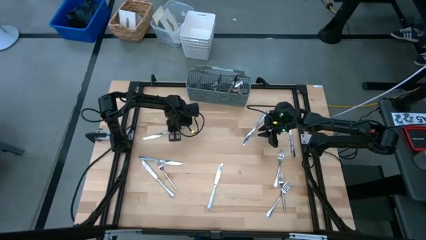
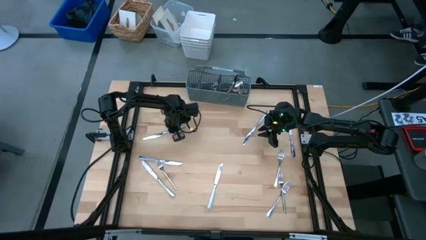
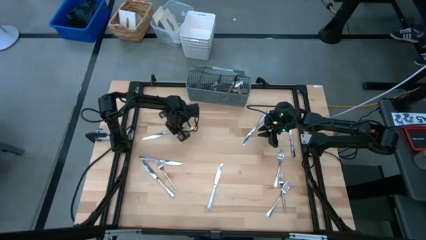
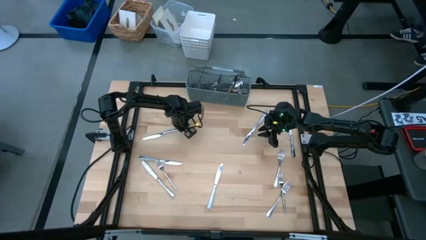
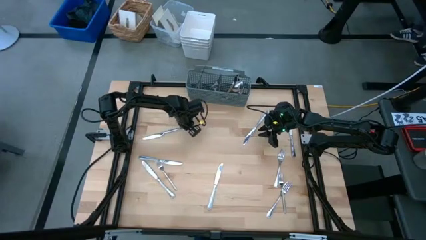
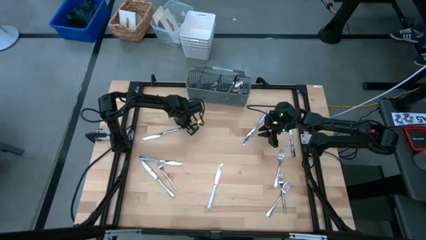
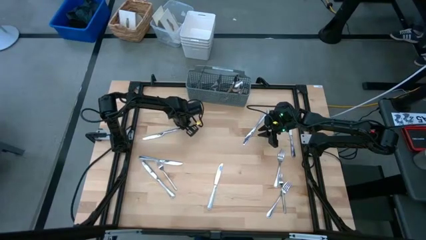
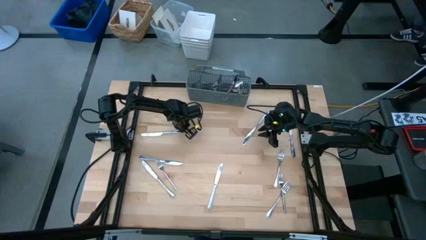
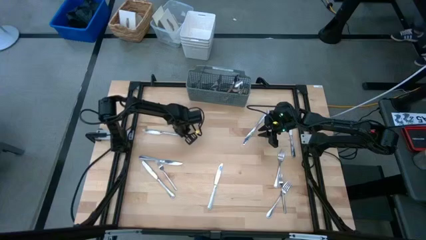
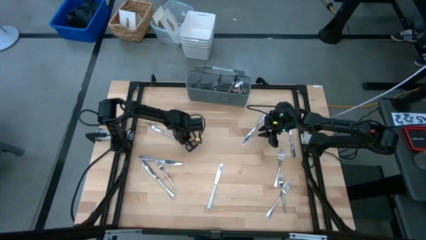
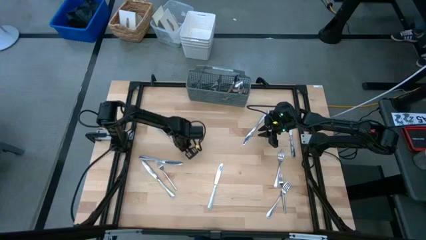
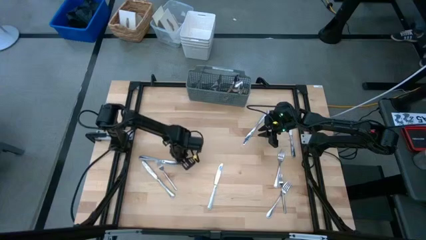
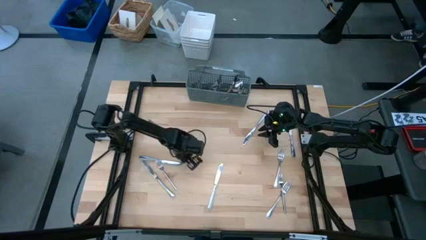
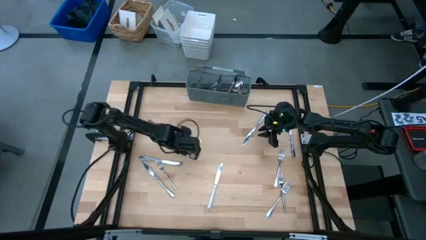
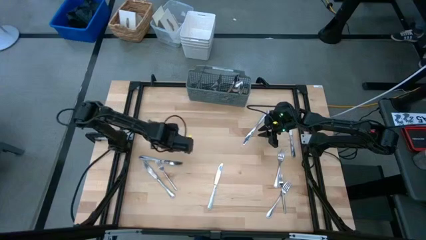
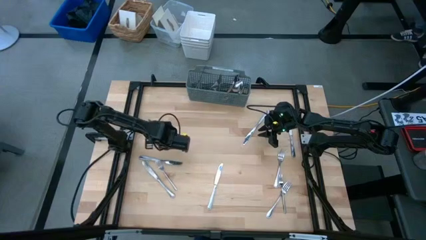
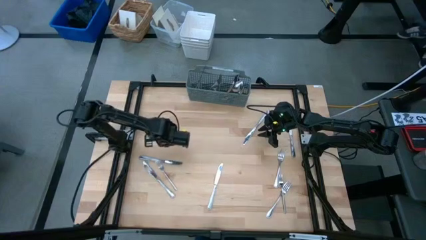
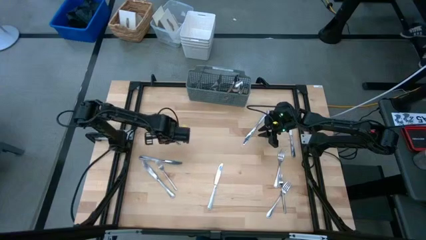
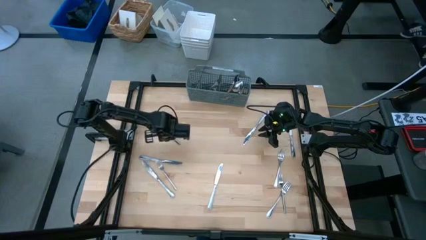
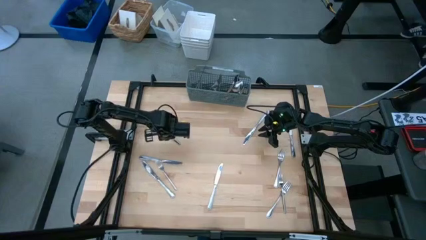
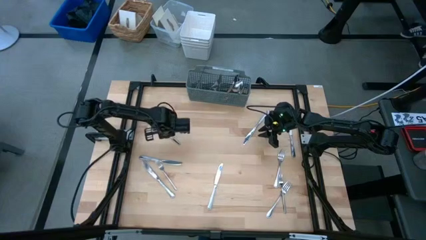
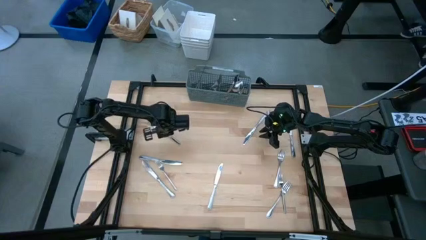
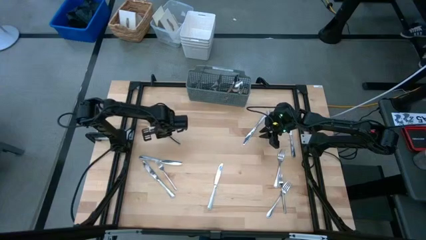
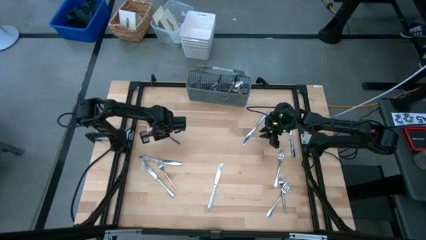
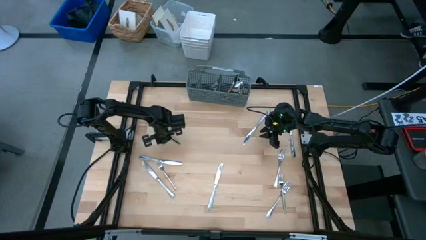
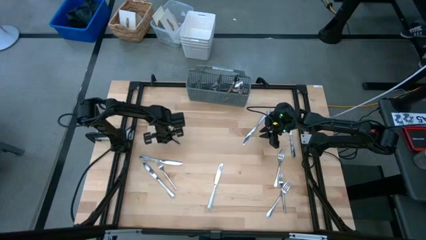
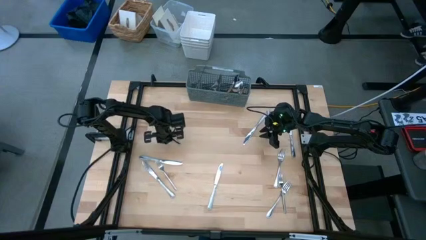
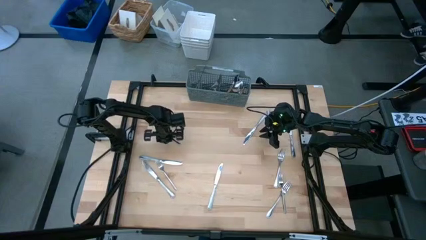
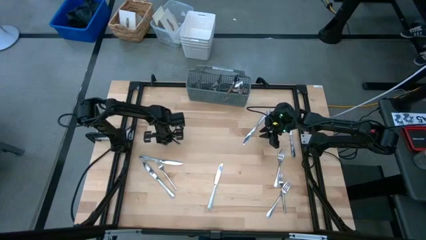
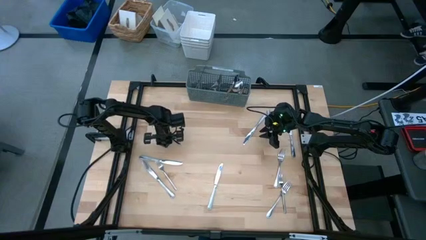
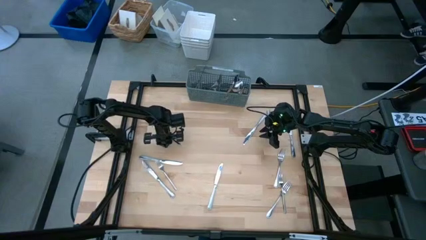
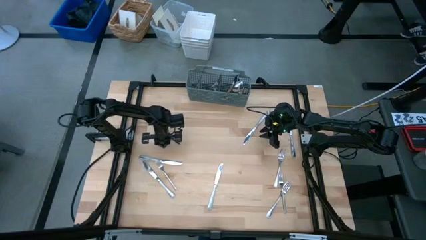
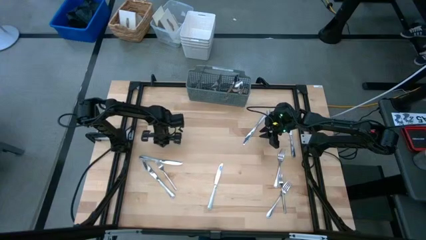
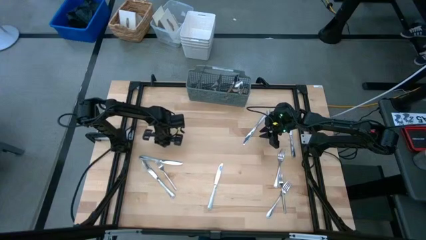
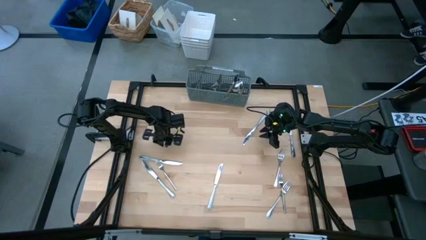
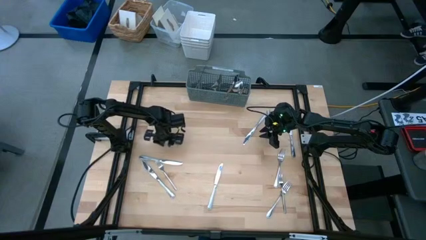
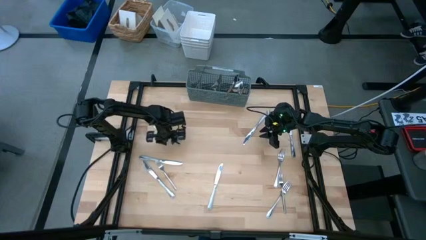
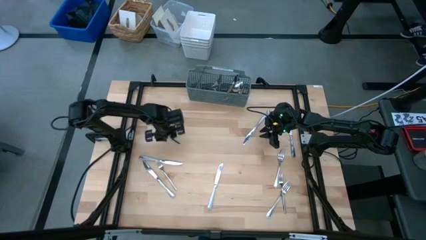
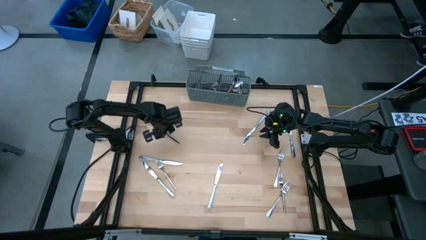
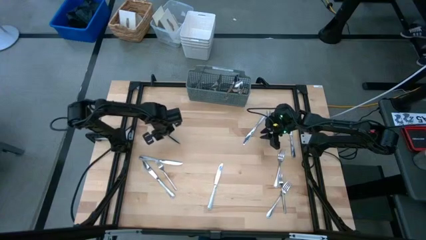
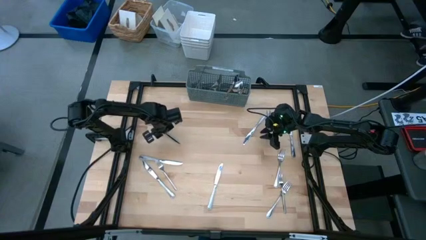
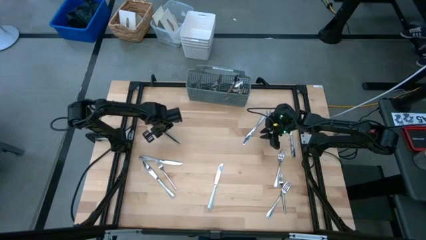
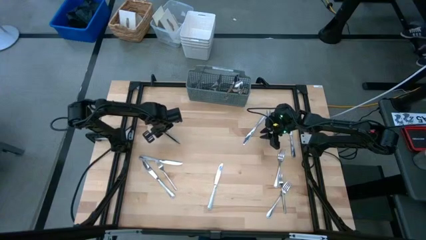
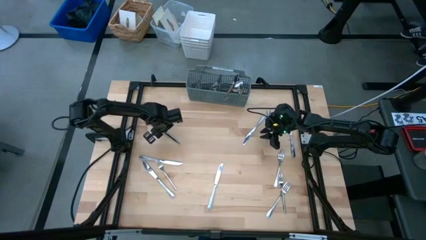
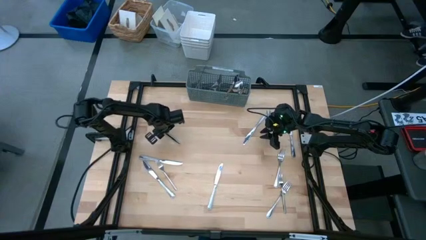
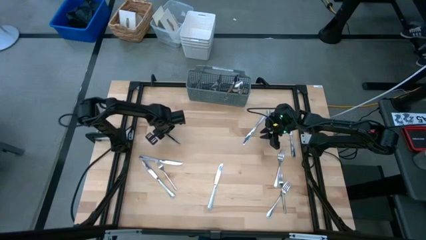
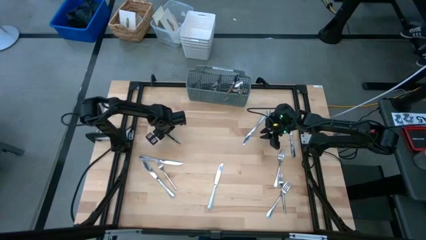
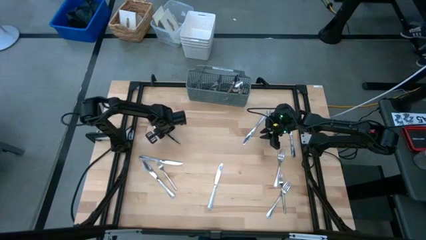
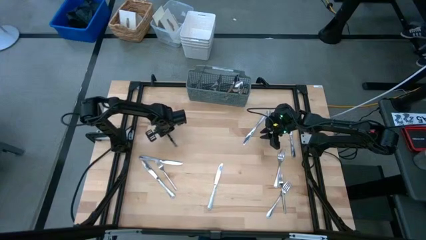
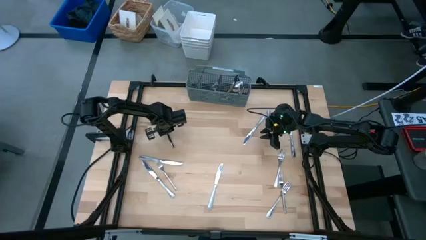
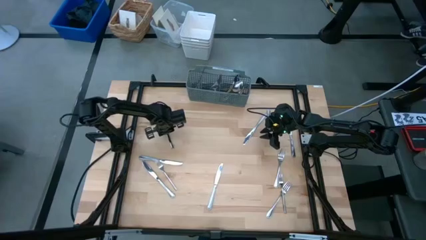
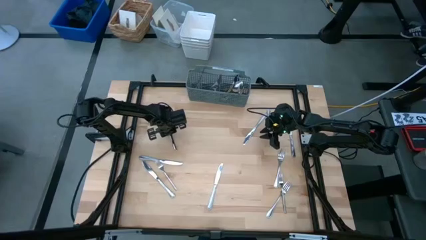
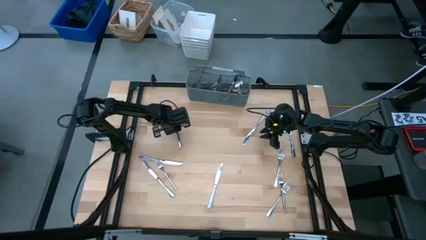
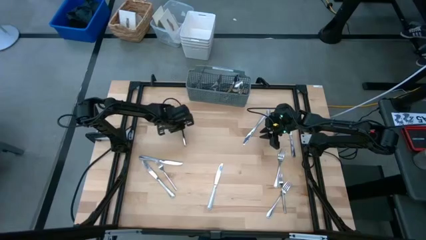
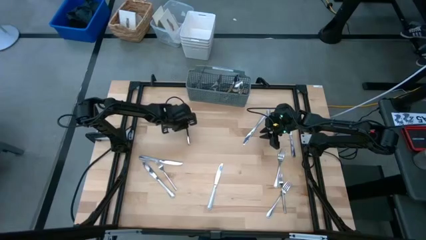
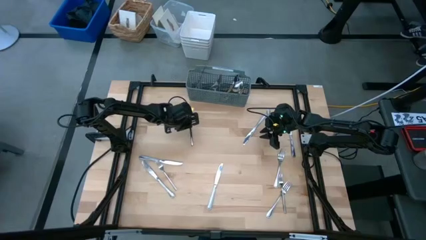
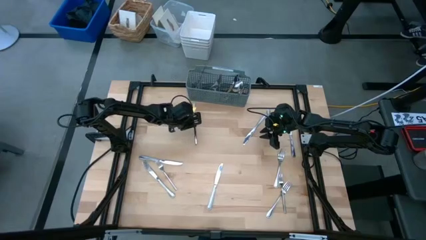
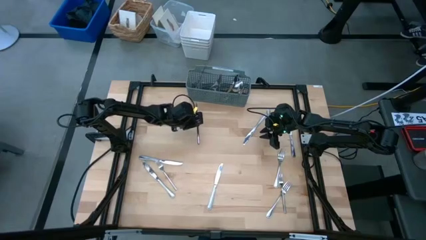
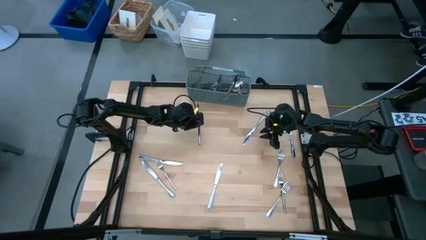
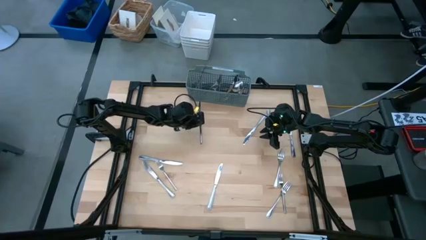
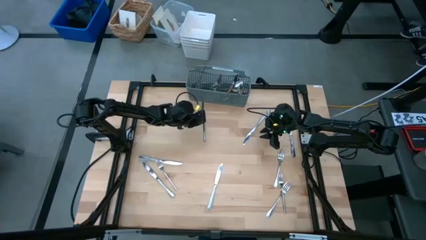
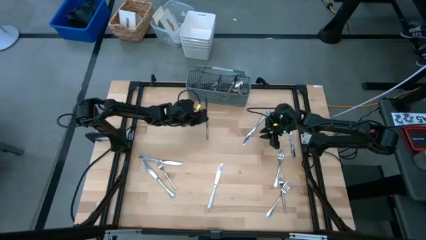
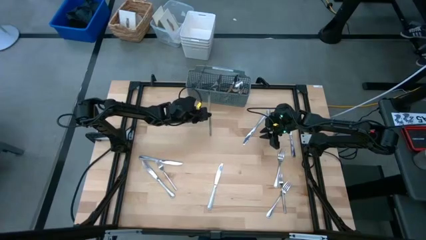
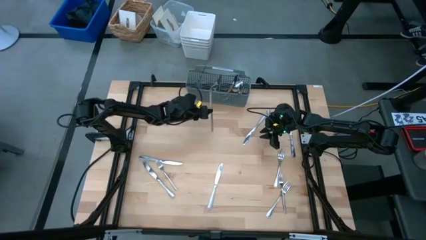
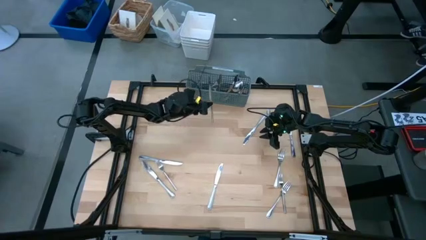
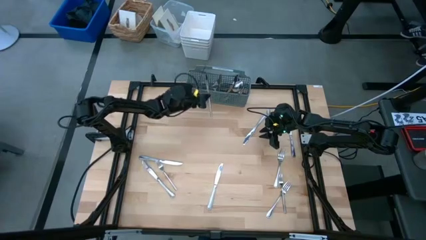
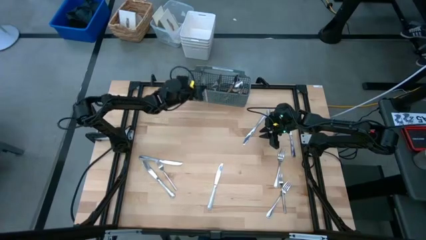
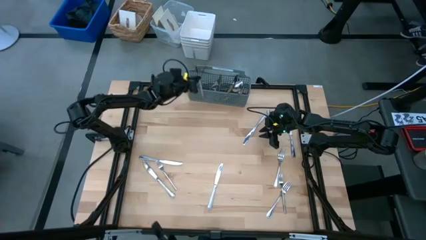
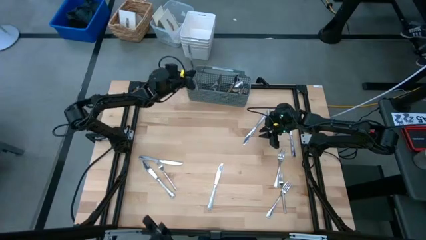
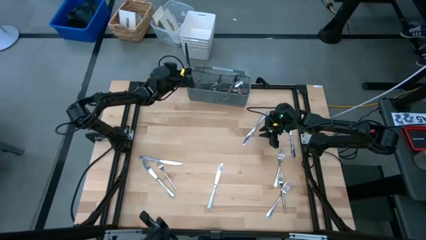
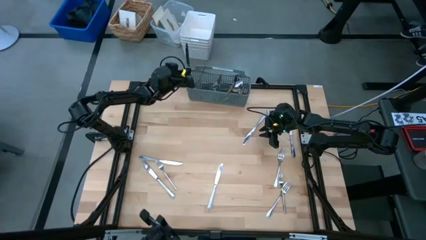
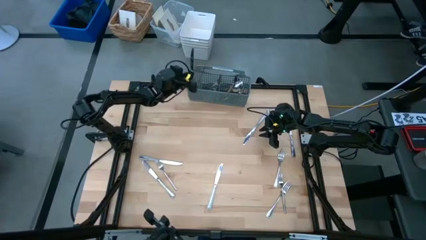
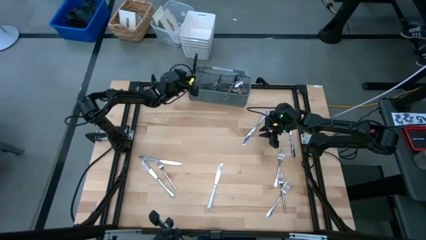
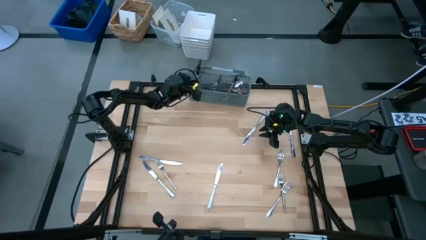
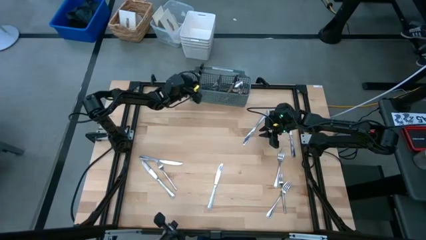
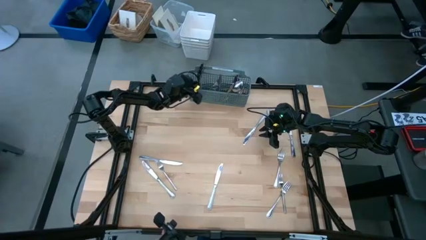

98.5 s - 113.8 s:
Task: Sort silverware
Put the table knife into the gray silverware organizer

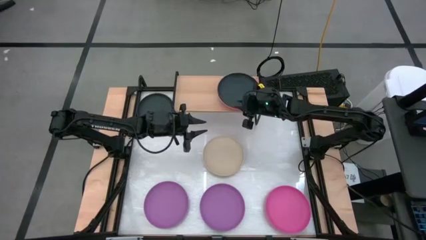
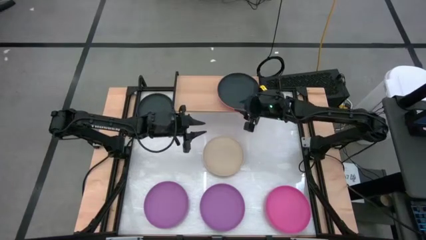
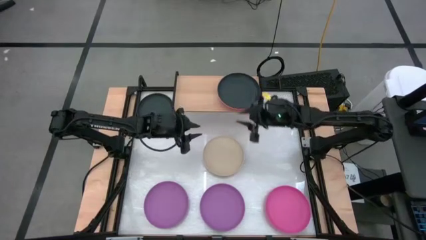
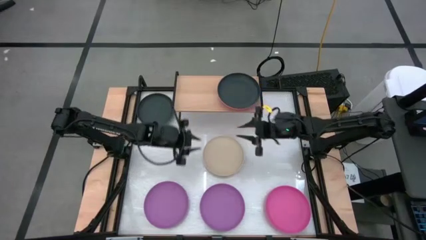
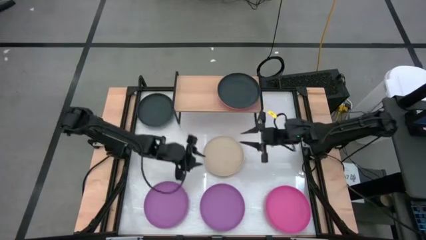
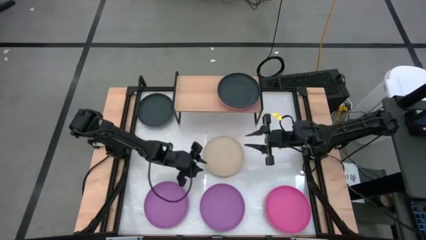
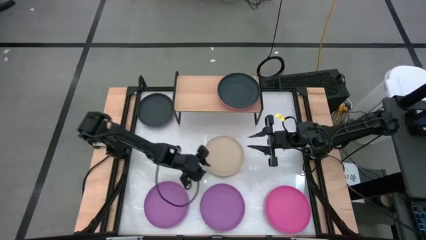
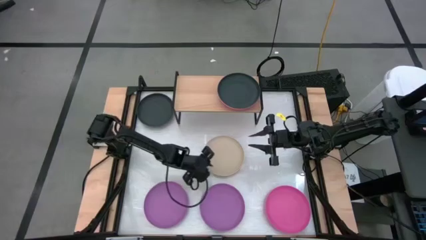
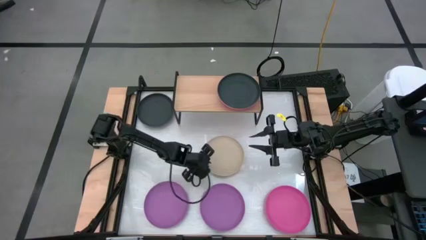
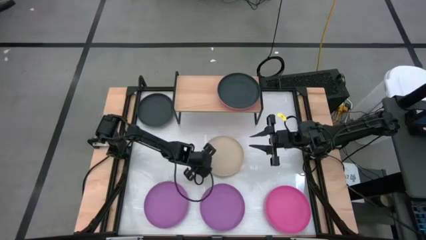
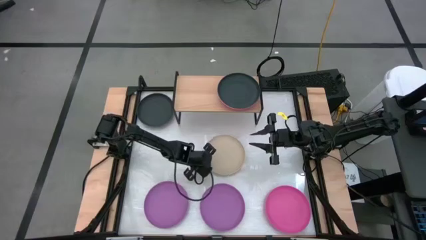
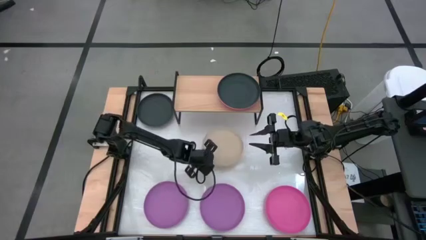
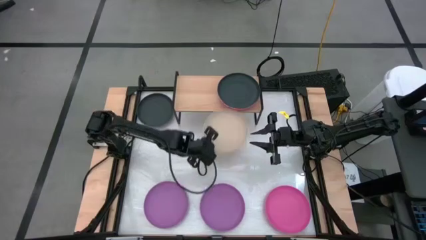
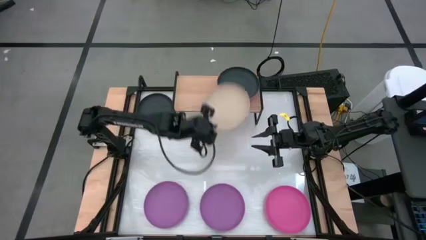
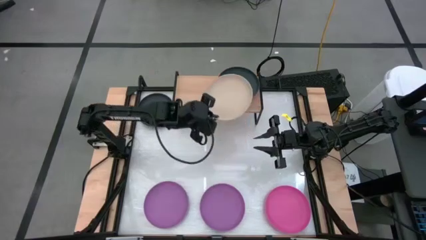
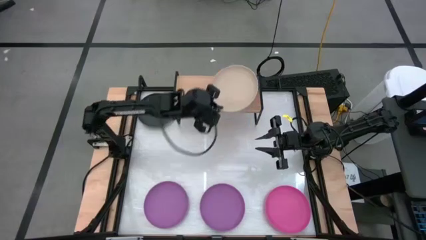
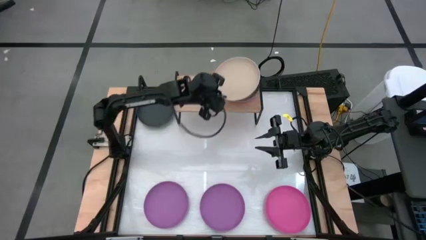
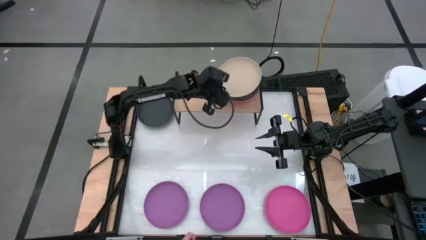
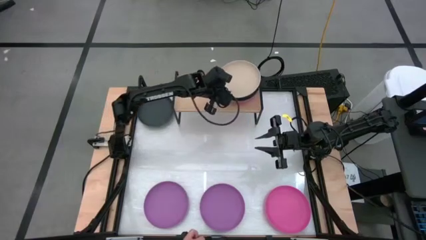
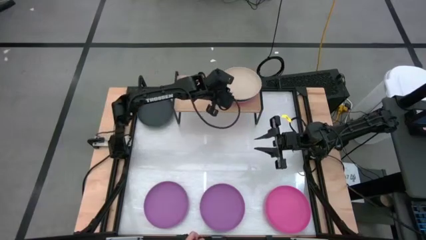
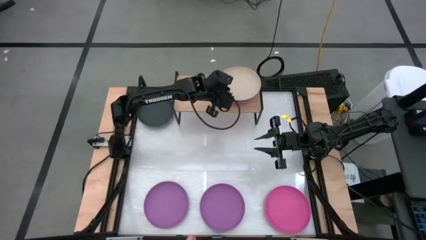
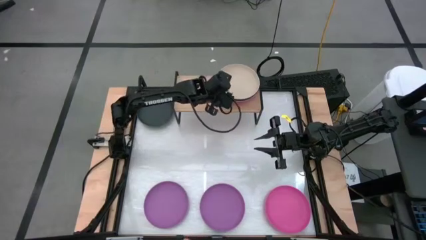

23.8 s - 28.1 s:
Task: Place and stack plates onto a shelf
Stack the white plate on top of the black plate on the shelf
